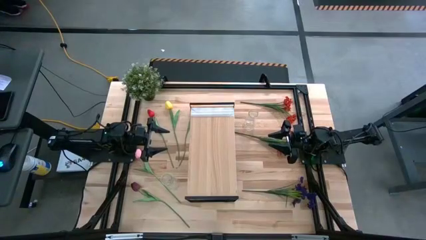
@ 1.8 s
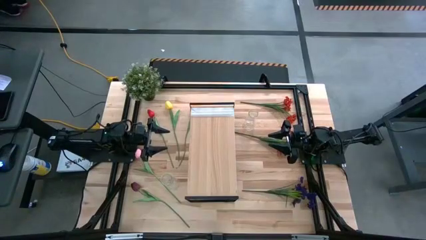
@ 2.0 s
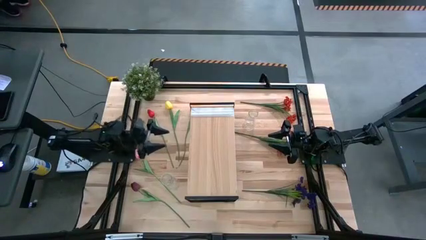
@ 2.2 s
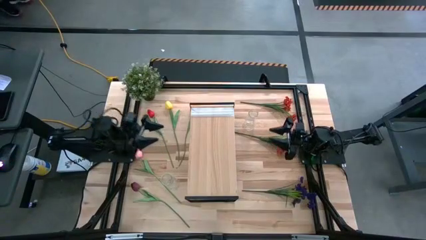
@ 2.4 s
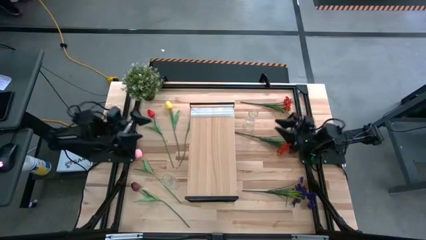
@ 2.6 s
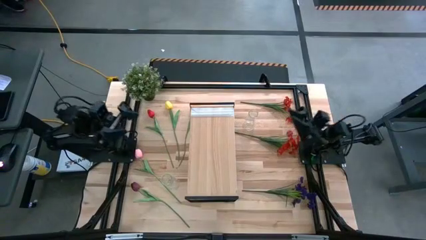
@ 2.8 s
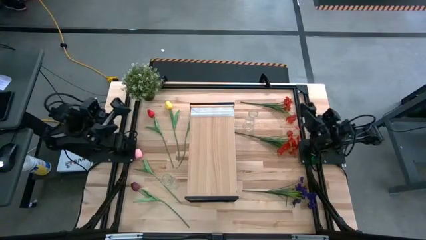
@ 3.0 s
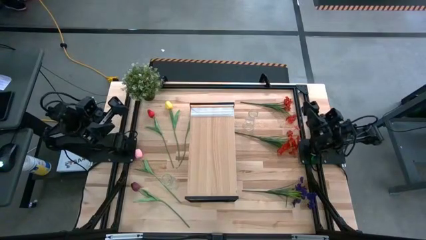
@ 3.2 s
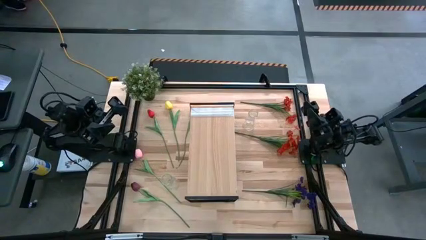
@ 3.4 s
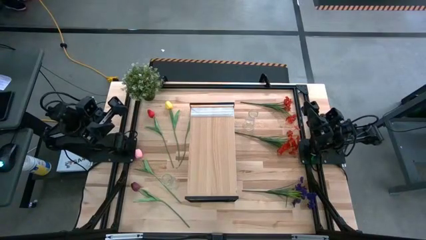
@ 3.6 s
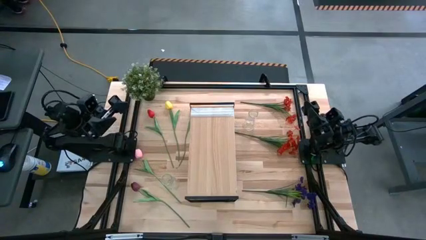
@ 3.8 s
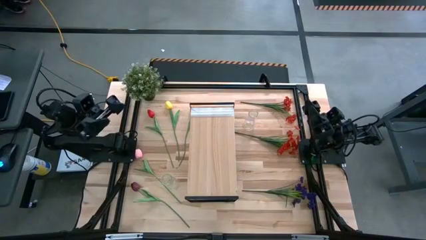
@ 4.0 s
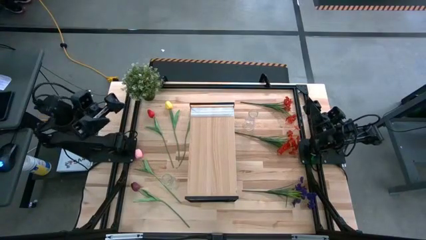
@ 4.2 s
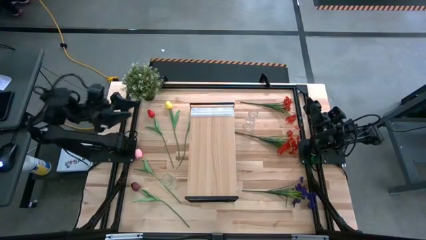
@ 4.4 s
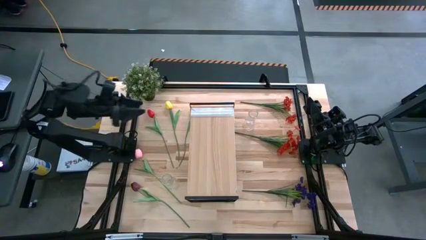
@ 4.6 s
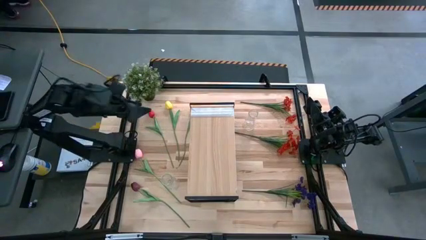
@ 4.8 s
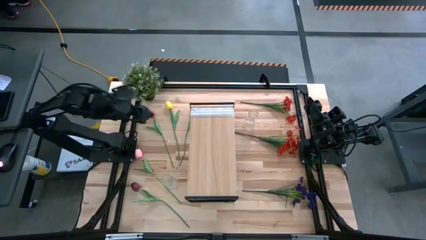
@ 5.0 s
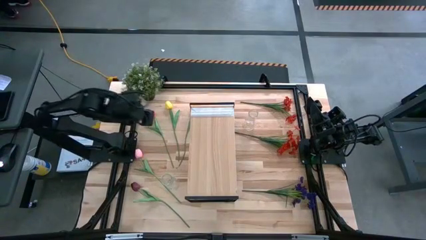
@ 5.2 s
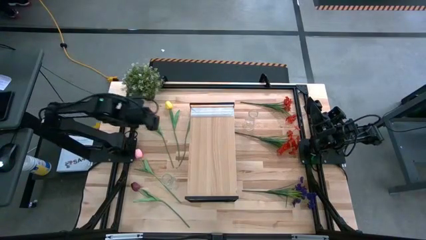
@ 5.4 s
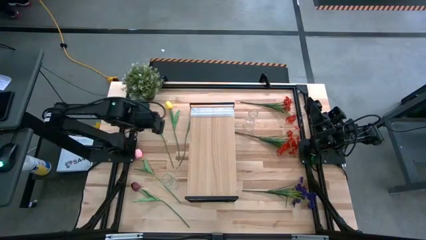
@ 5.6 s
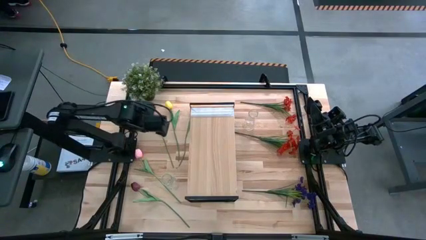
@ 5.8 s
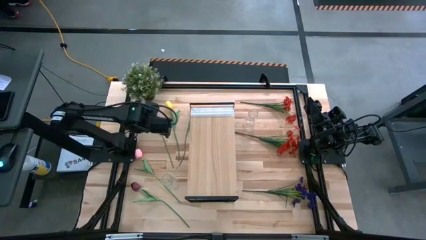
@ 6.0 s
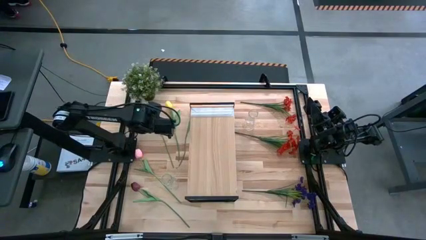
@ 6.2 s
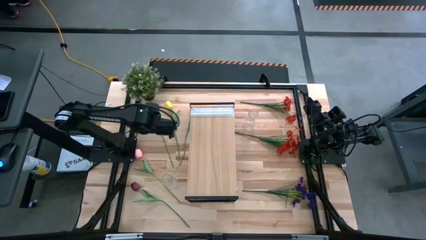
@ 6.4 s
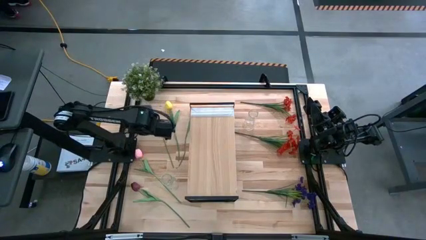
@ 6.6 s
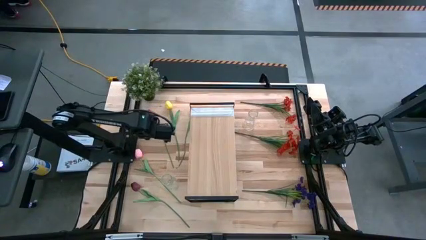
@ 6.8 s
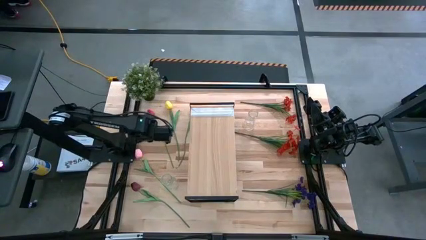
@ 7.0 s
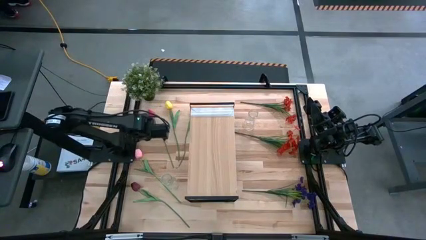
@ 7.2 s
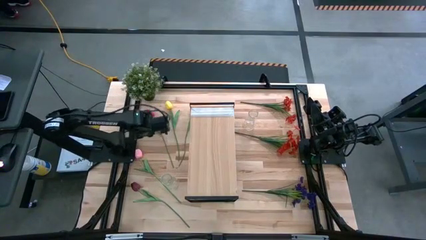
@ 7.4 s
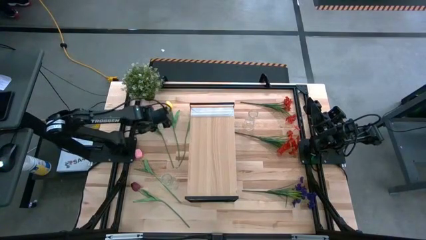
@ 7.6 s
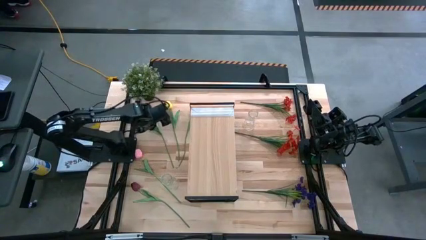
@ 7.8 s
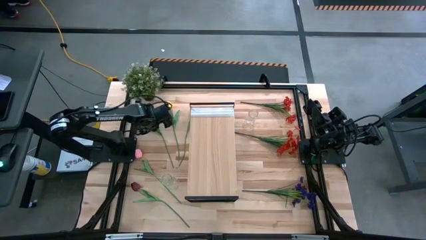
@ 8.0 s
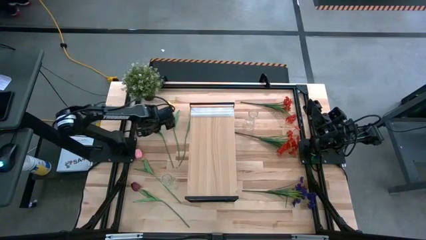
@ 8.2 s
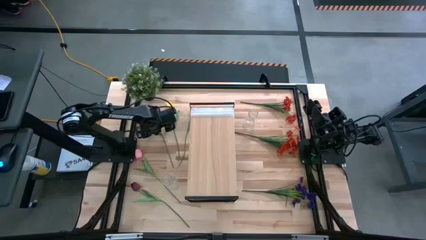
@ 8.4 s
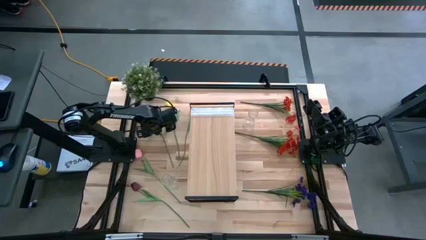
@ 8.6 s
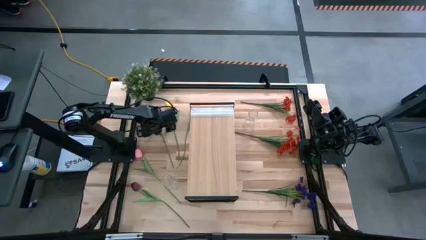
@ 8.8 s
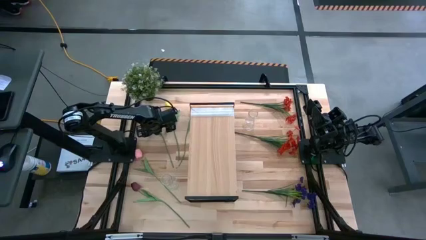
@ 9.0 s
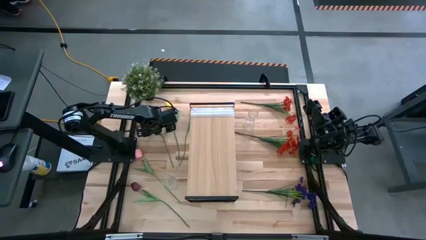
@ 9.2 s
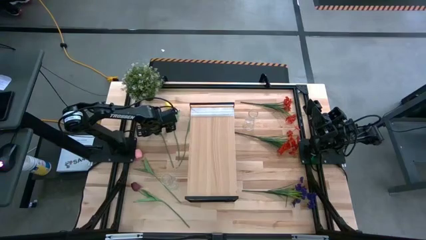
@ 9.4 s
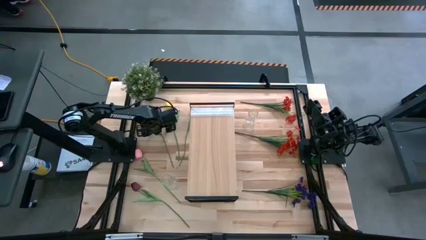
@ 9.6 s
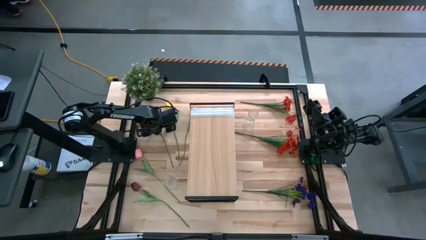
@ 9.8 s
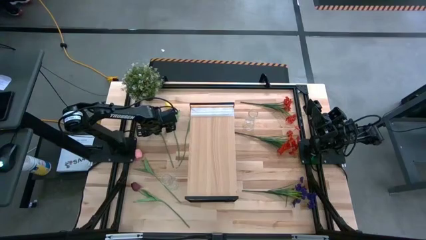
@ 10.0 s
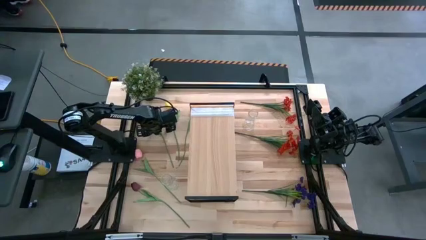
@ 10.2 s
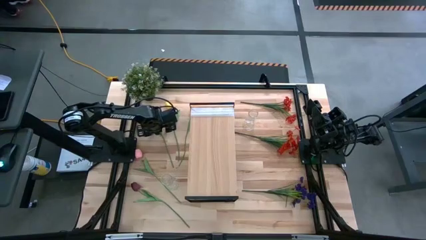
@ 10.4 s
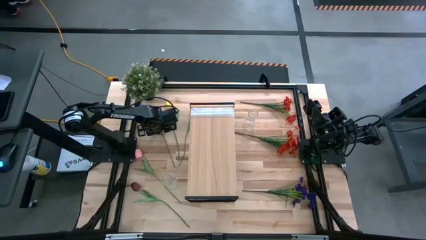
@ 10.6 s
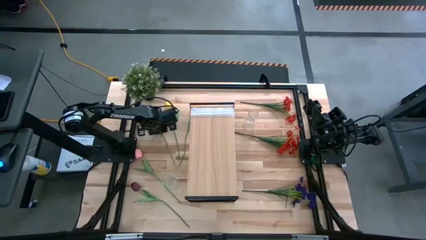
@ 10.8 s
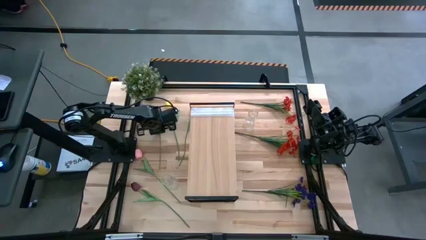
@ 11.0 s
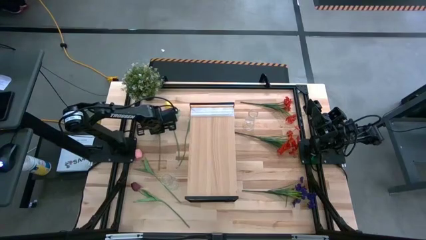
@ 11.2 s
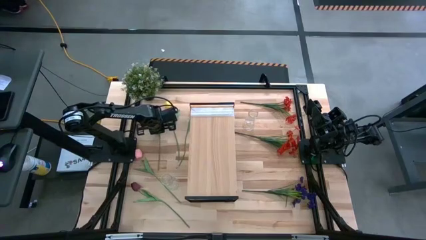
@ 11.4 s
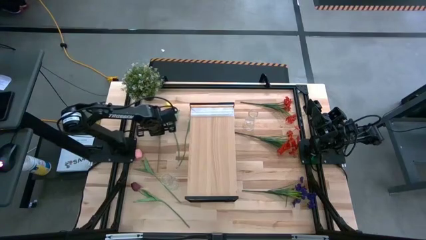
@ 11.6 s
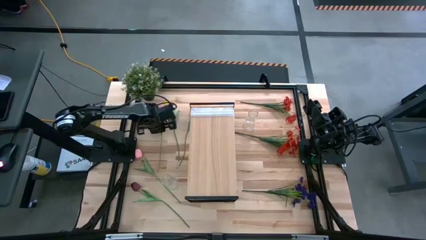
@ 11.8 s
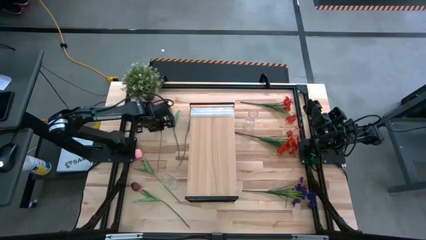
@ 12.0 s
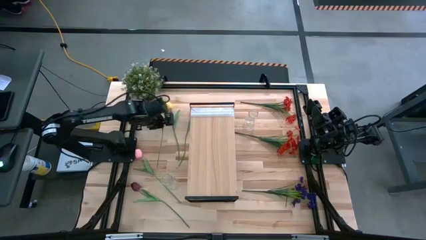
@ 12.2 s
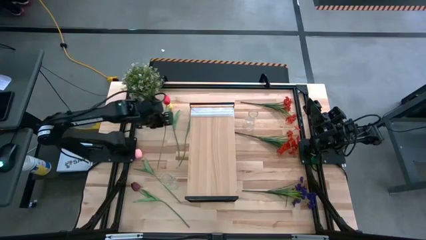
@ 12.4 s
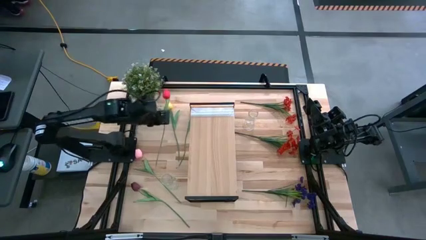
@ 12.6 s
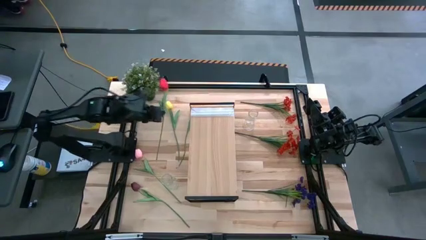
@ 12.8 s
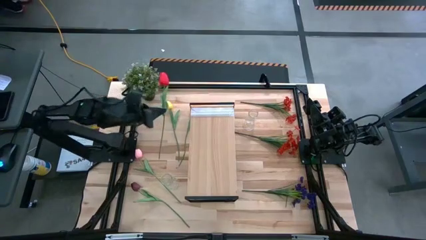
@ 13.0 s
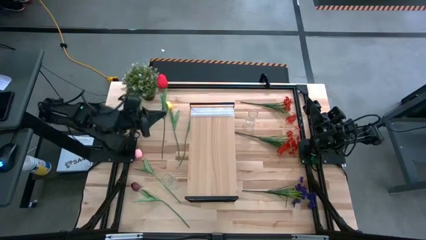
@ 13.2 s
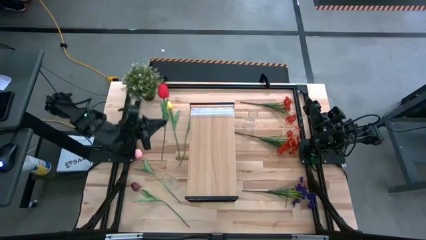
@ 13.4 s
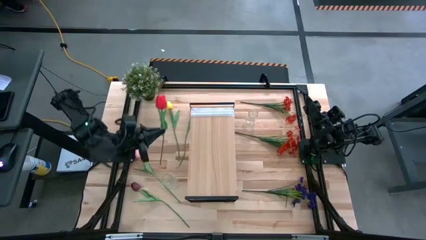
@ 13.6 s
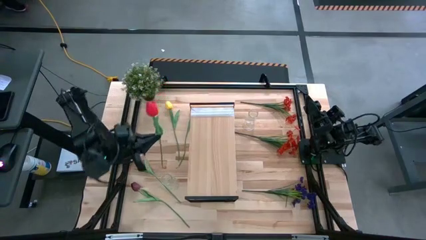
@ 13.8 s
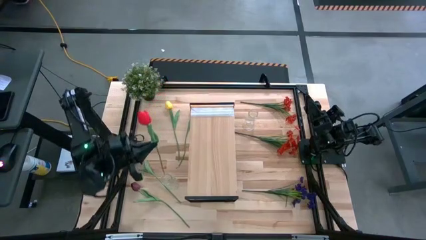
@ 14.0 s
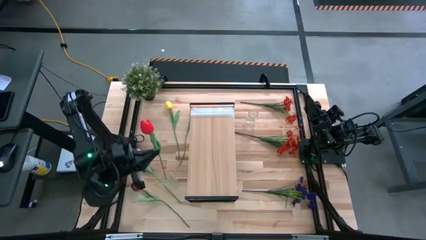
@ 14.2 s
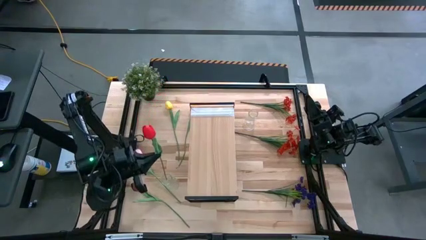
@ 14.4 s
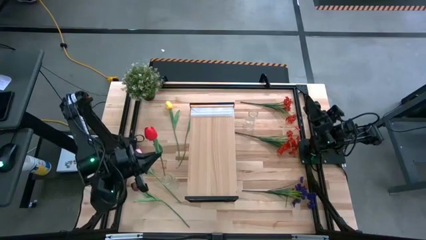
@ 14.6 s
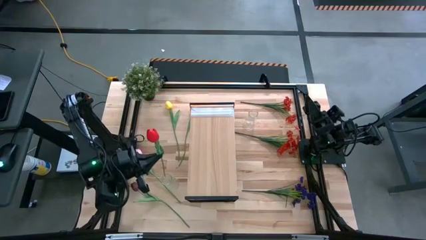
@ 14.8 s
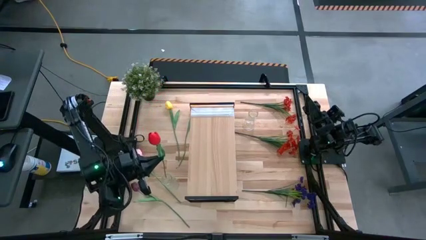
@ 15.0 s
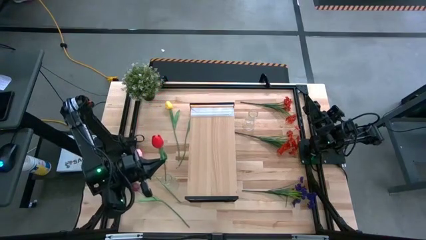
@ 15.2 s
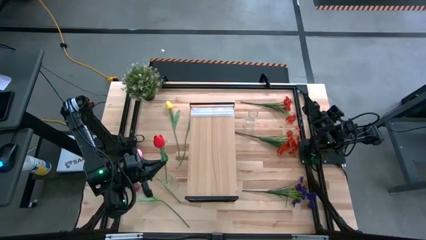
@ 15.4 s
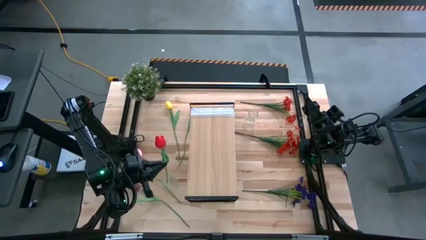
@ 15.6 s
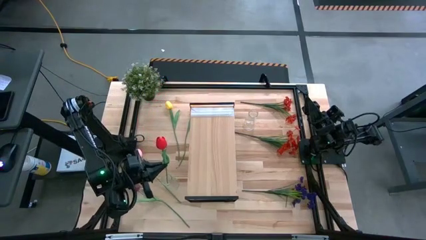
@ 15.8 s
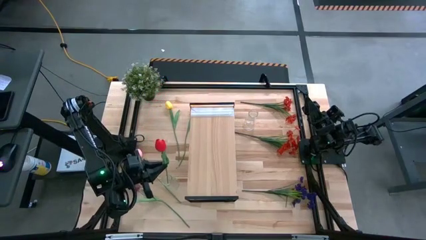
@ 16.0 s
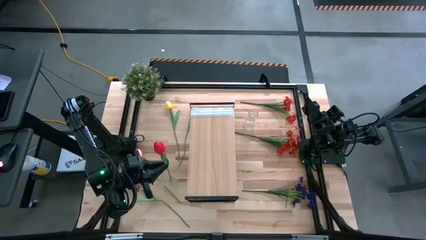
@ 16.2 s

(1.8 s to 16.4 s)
Task: Pick and place flowers into a vace then onto a shelf
Put the red tulip into the bottom vase

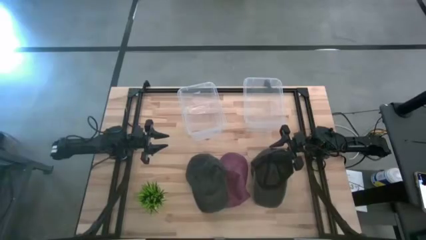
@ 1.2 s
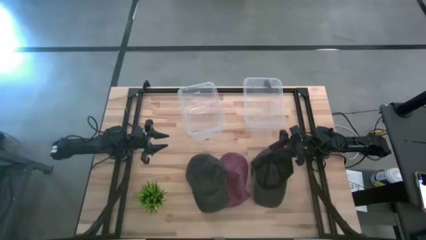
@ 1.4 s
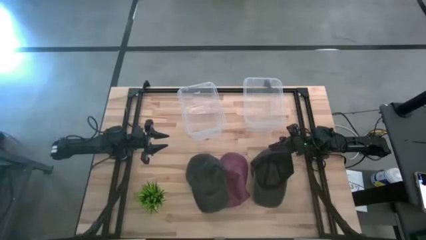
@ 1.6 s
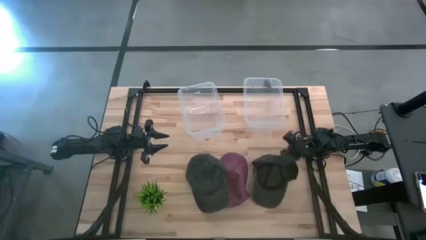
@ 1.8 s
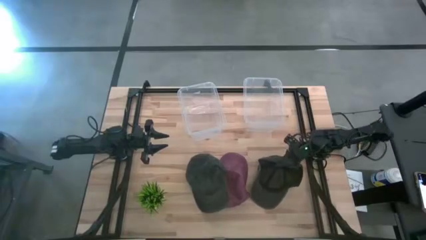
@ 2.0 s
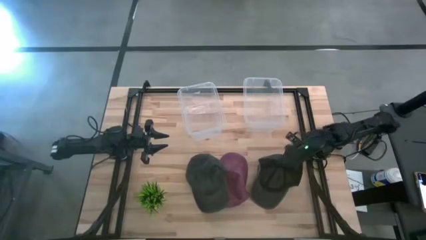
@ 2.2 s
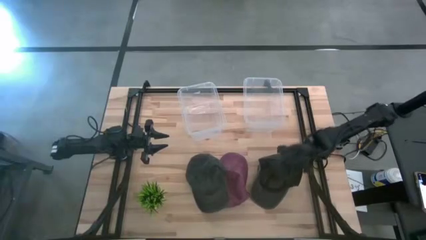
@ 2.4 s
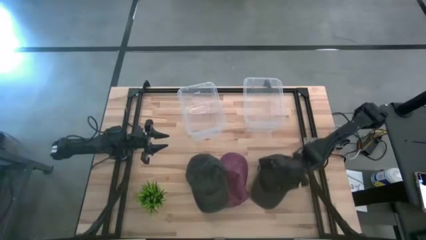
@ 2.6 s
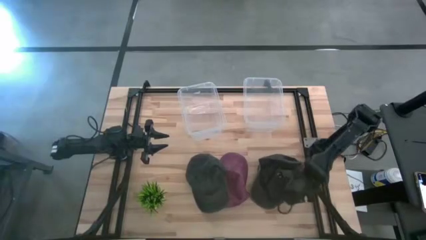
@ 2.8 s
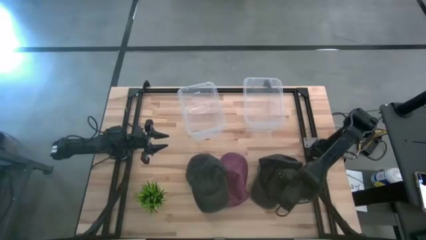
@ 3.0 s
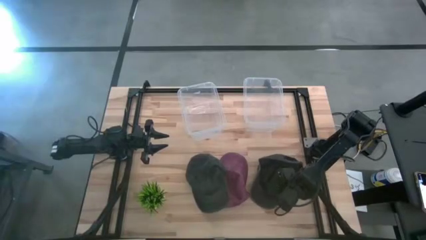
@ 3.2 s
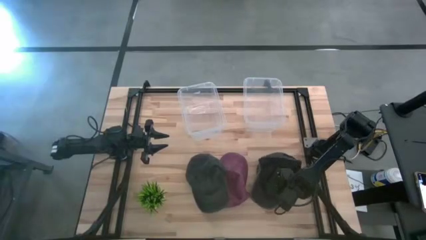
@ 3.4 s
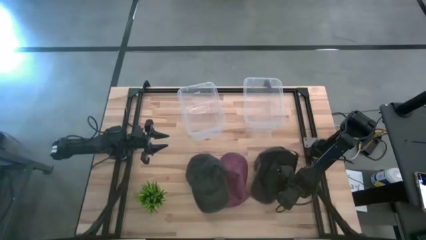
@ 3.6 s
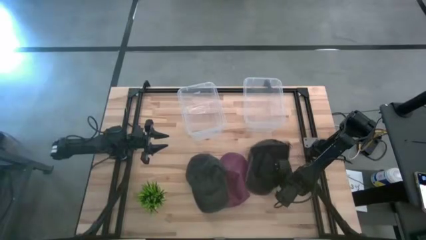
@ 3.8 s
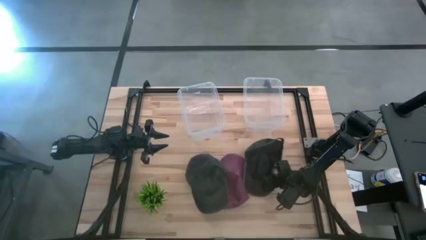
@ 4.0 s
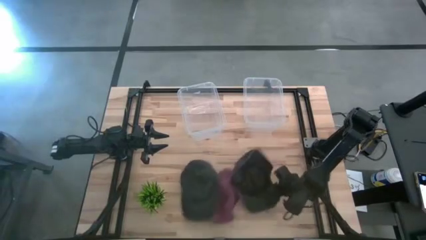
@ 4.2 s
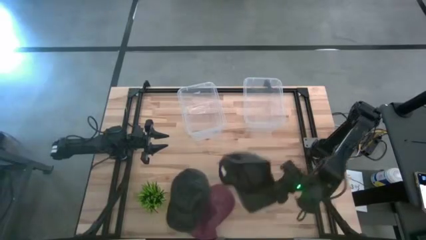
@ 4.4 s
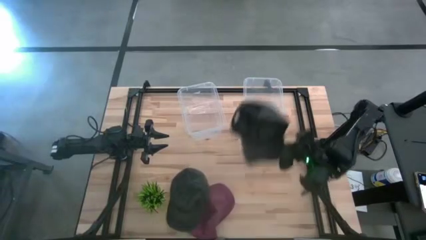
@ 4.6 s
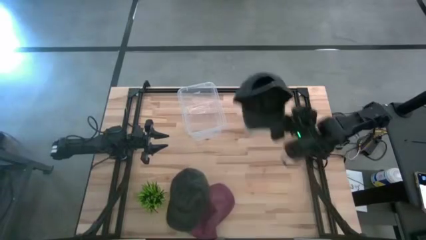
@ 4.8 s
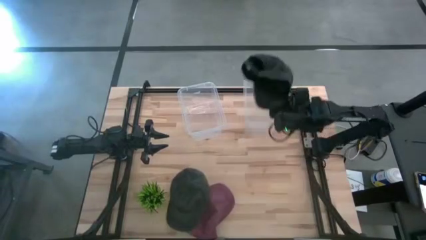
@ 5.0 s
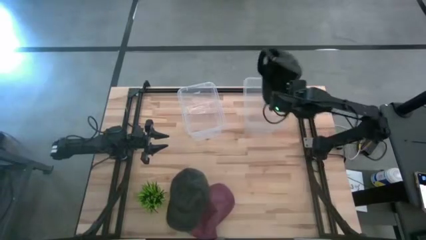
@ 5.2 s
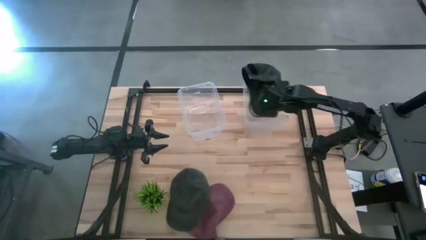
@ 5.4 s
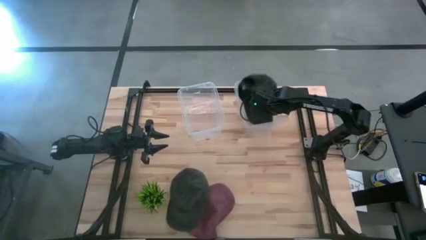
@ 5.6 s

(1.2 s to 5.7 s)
Task: Pick & Place hat
Put the right black cap into the right transparent bin
